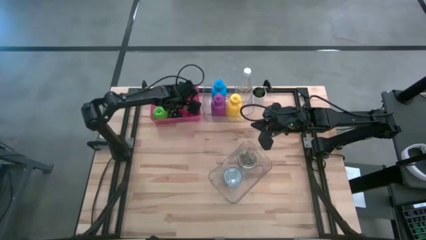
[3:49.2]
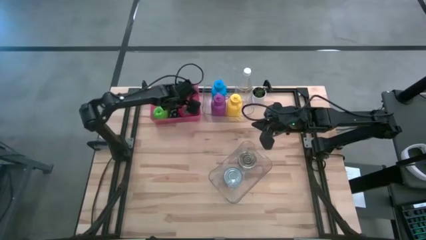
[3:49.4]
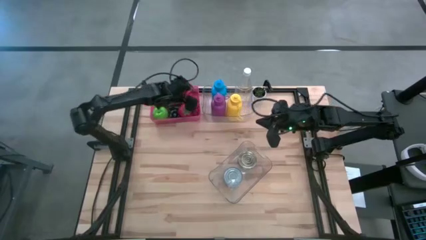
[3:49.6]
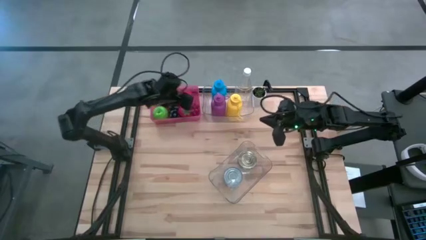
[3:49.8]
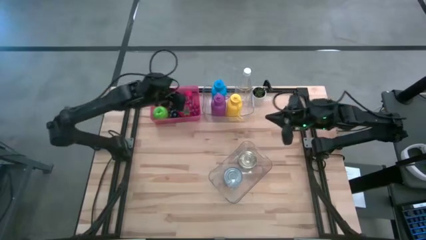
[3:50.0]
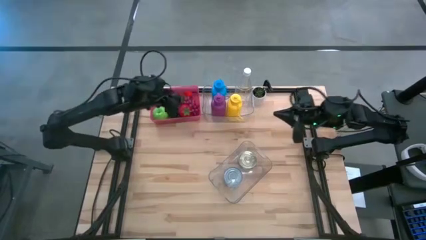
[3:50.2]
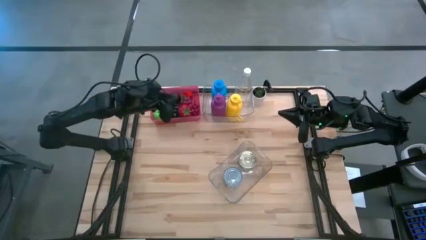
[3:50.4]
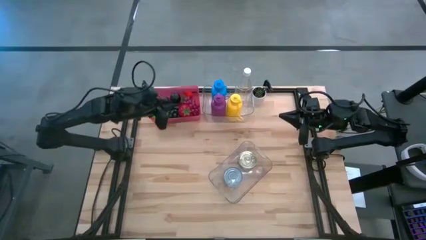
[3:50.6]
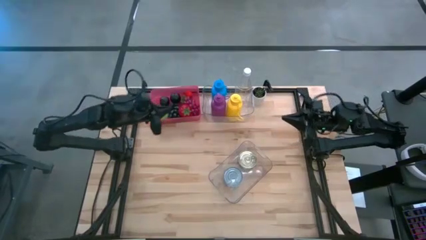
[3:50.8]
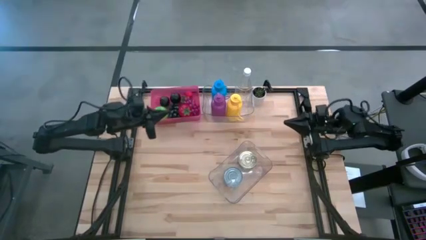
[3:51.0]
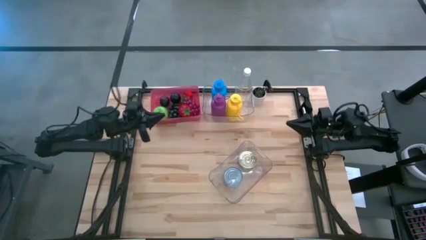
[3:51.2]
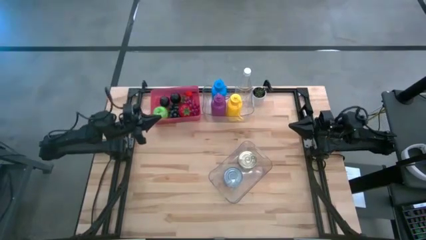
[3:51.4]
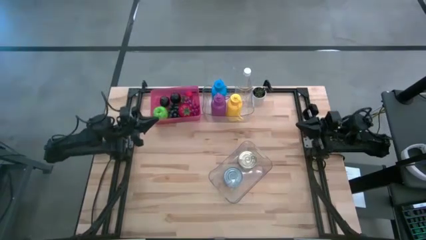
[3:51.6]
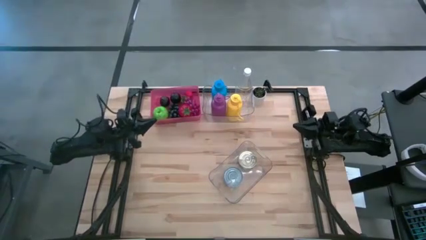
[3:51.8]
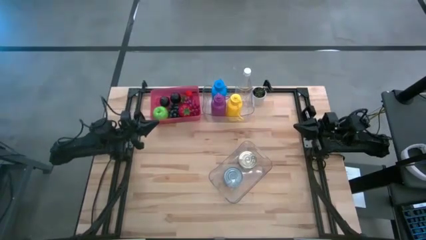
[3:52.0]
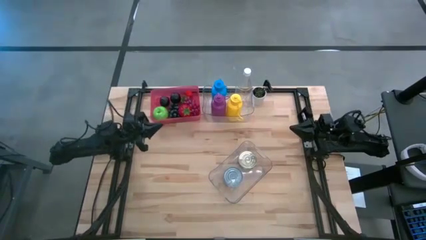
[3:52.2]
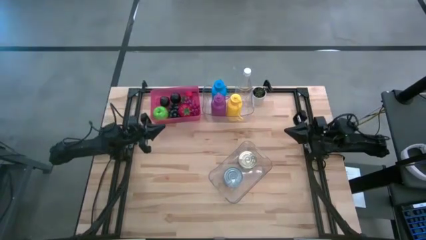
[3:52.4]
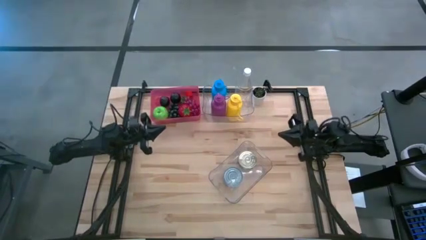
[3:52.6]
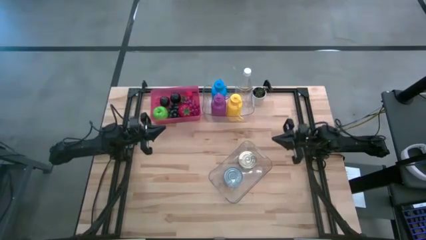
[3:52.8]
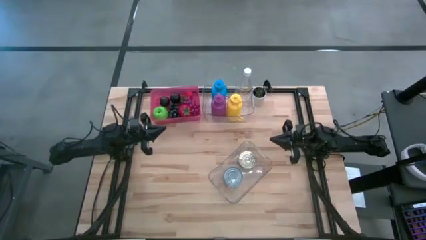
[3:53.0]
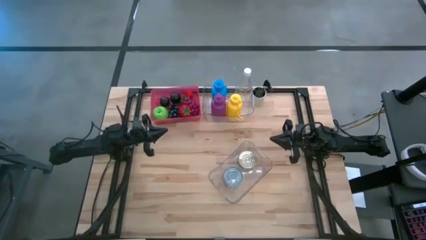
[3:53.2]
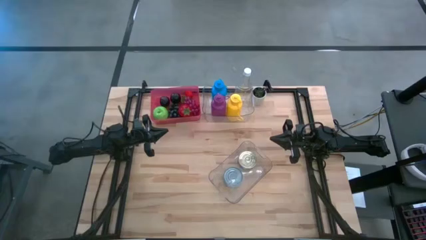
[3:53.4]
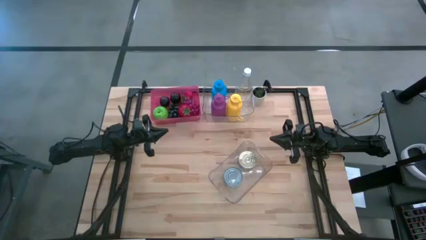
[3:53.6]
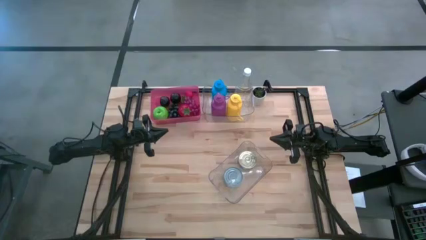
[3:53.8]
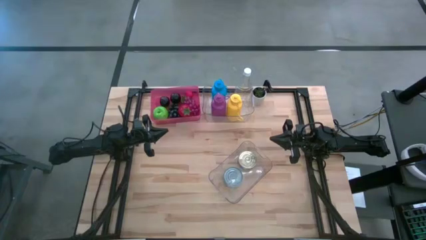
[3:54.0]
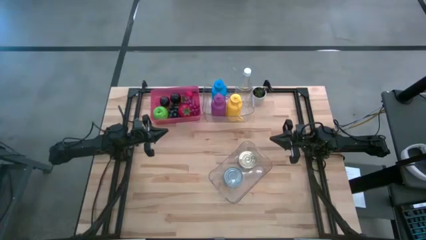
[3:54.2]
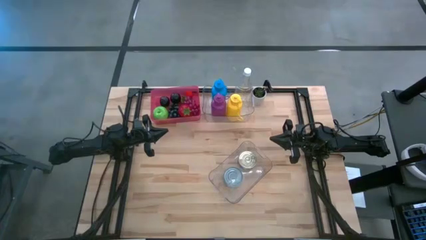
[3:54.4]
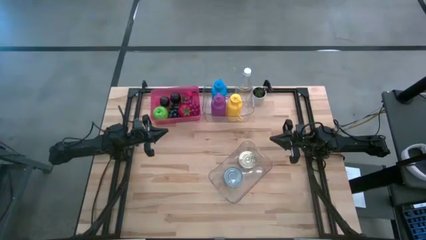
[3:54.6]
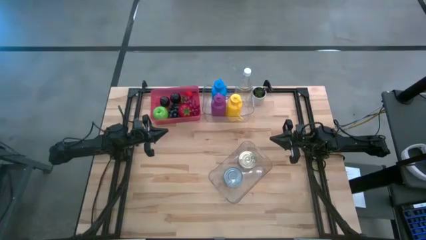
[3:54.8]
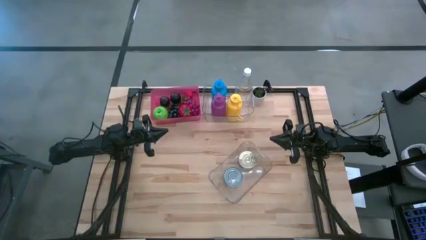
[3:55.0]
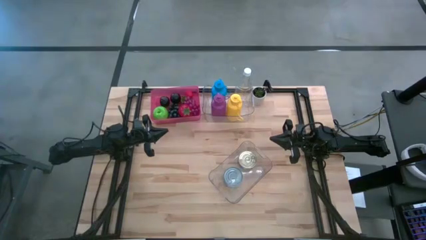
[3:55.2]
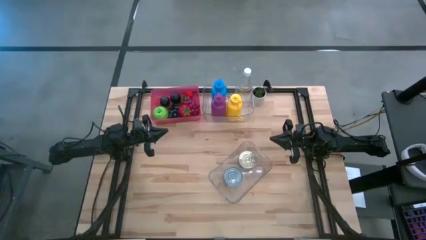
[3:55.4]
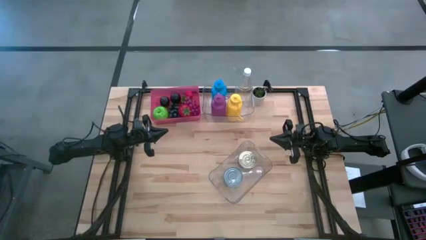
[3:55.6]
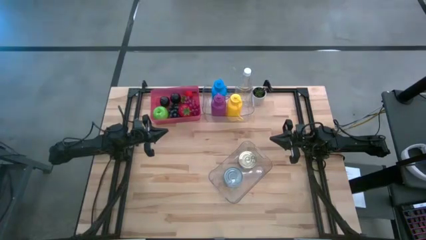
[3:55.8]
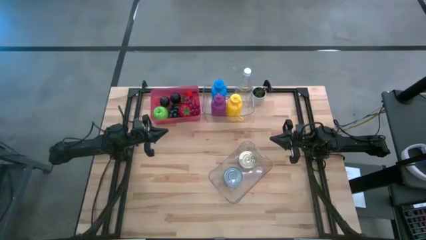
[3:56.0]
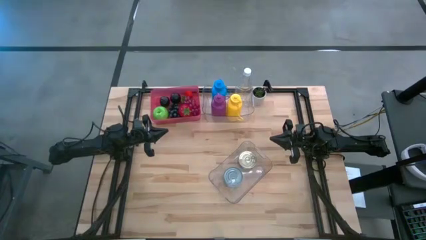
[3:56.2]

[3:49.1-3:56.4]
Task: Pick & Place Food Item
Return to Home Position

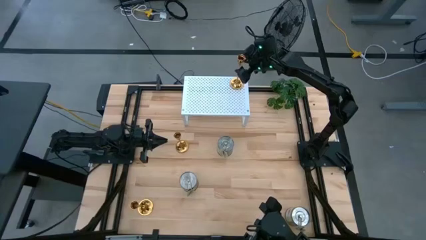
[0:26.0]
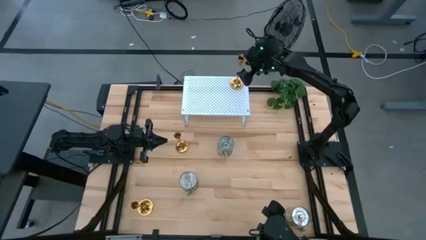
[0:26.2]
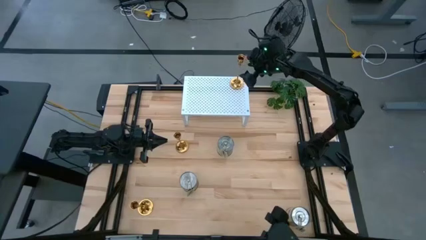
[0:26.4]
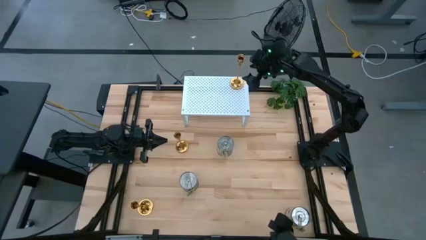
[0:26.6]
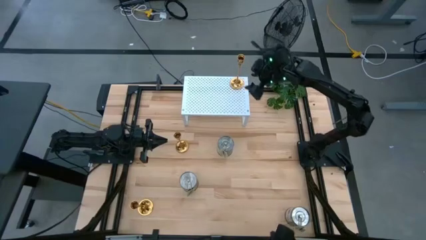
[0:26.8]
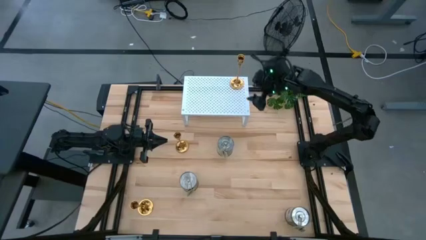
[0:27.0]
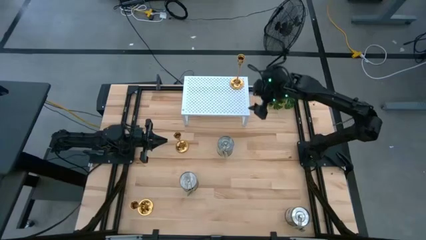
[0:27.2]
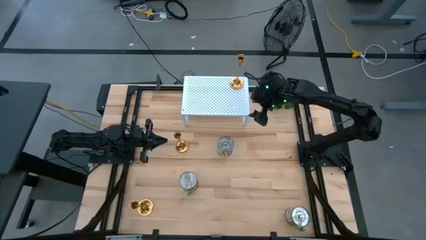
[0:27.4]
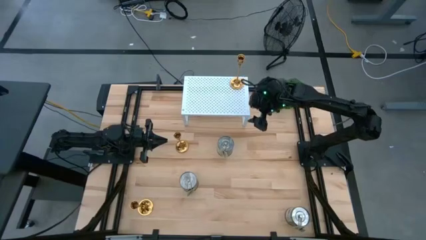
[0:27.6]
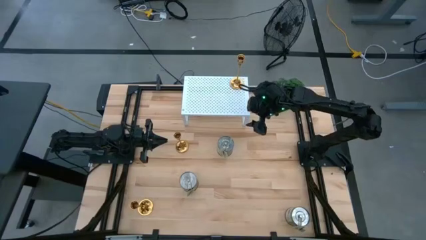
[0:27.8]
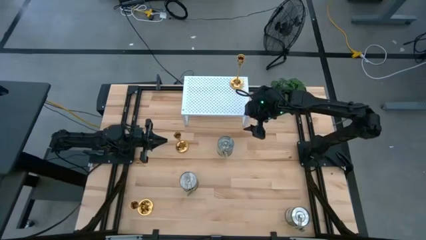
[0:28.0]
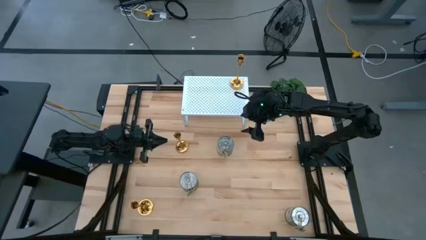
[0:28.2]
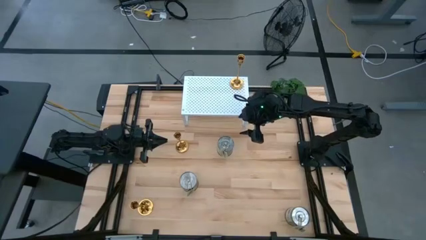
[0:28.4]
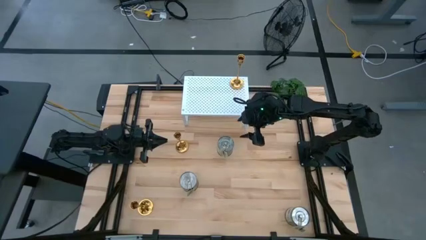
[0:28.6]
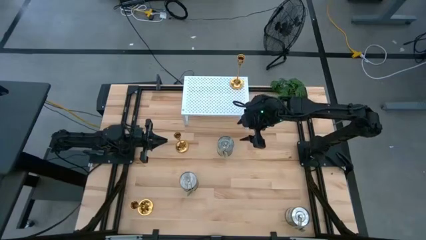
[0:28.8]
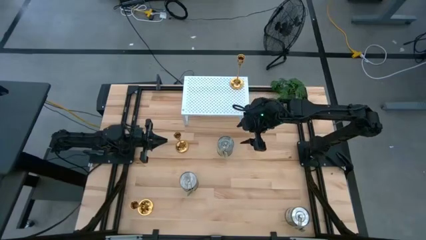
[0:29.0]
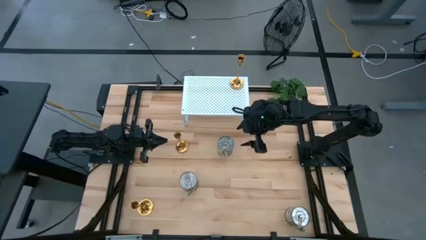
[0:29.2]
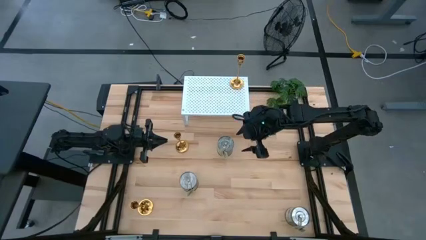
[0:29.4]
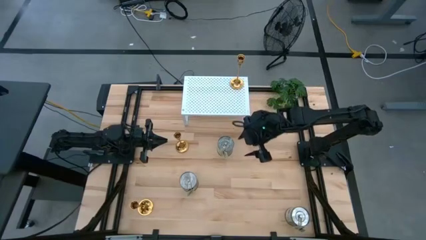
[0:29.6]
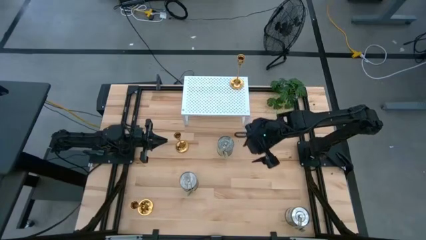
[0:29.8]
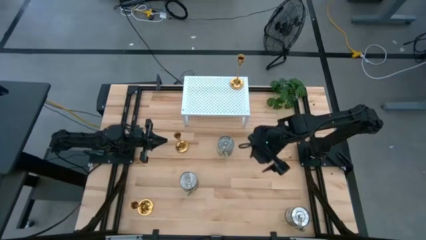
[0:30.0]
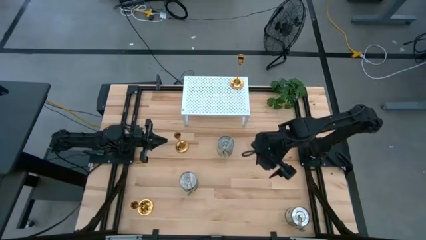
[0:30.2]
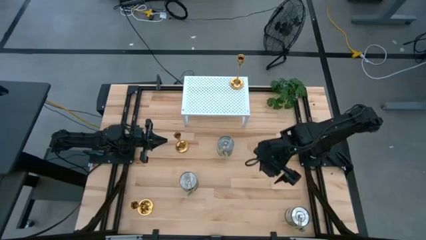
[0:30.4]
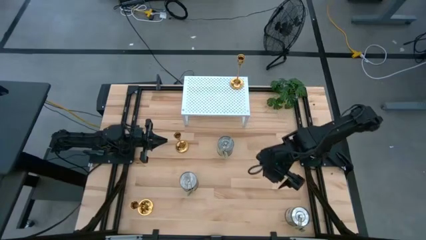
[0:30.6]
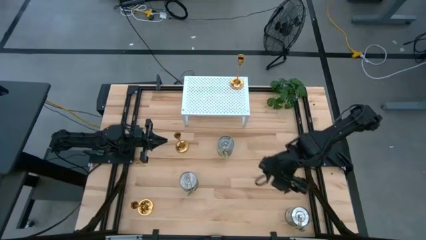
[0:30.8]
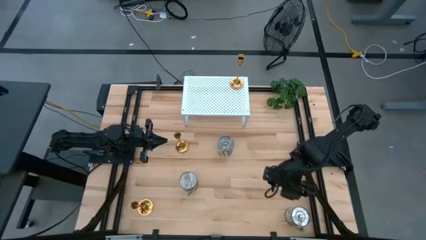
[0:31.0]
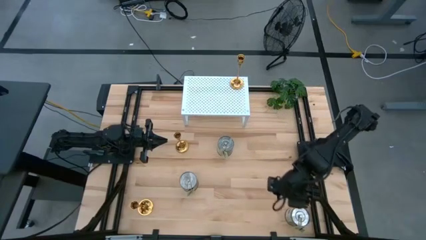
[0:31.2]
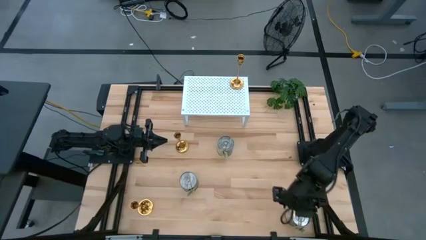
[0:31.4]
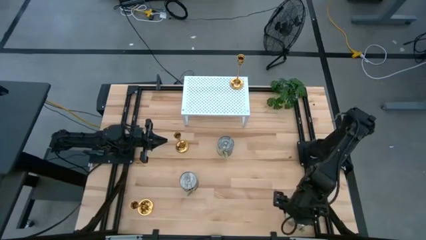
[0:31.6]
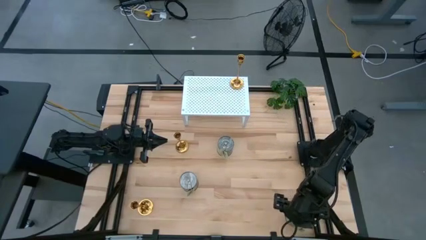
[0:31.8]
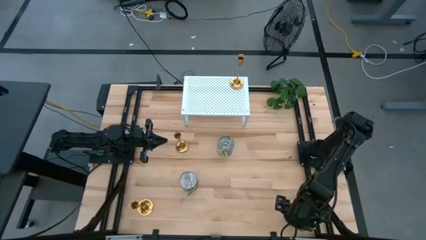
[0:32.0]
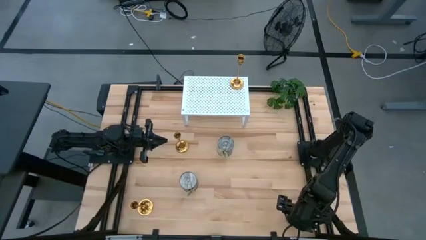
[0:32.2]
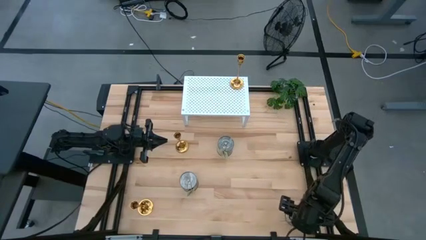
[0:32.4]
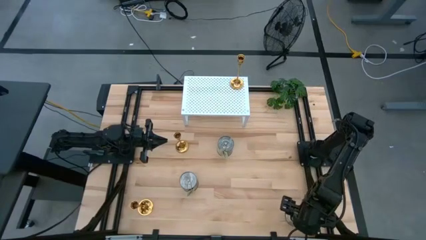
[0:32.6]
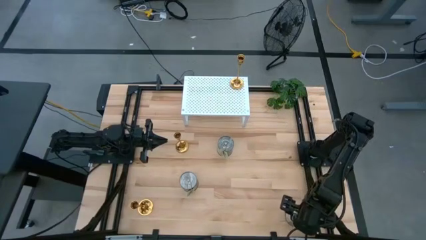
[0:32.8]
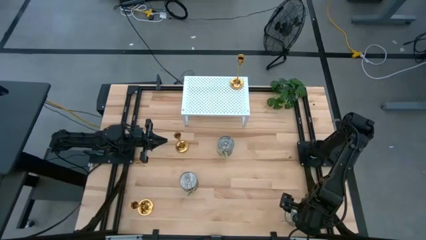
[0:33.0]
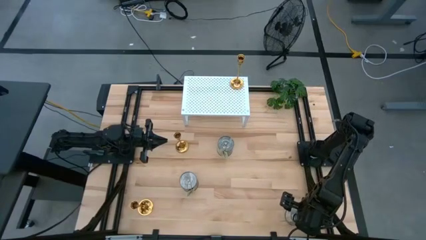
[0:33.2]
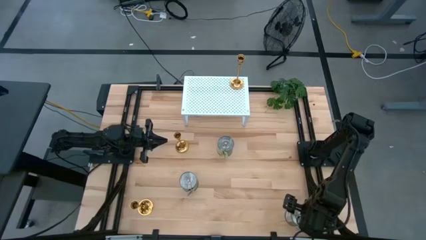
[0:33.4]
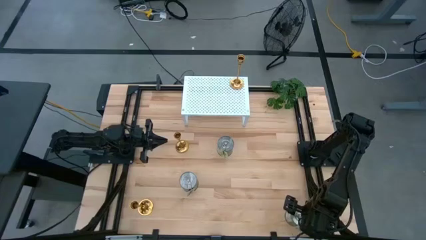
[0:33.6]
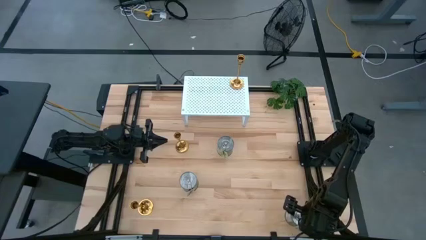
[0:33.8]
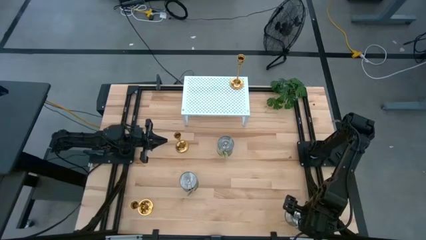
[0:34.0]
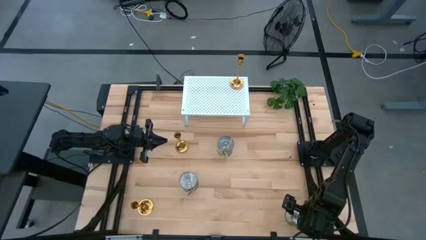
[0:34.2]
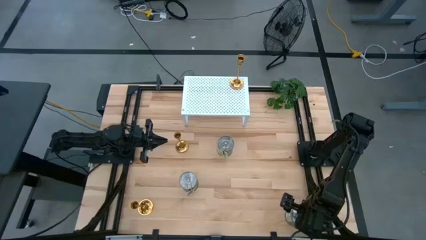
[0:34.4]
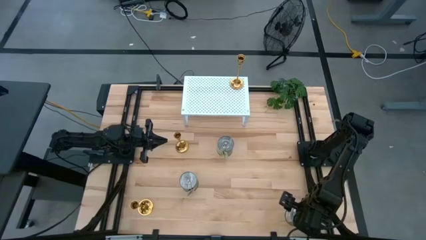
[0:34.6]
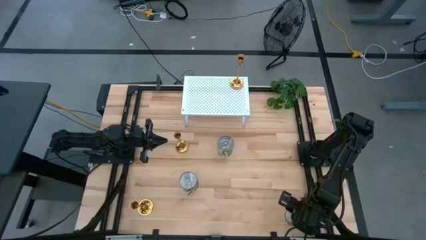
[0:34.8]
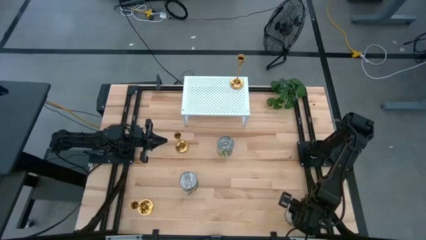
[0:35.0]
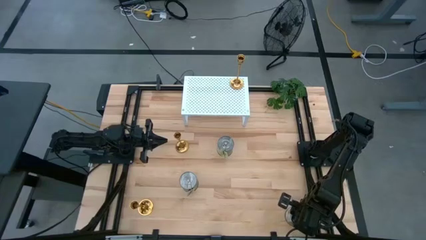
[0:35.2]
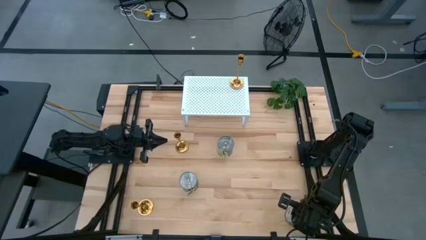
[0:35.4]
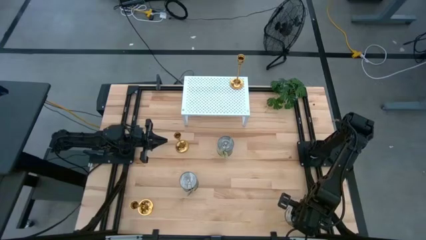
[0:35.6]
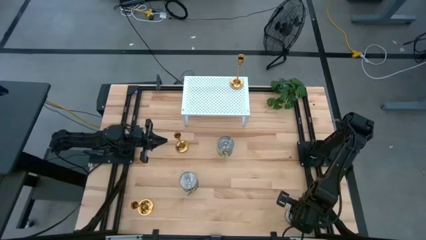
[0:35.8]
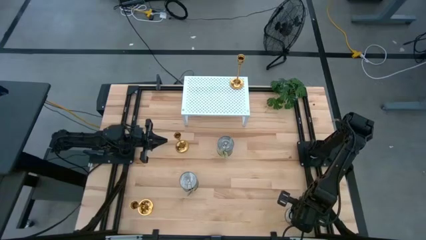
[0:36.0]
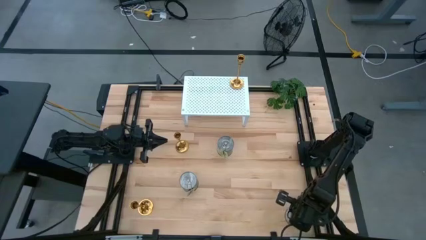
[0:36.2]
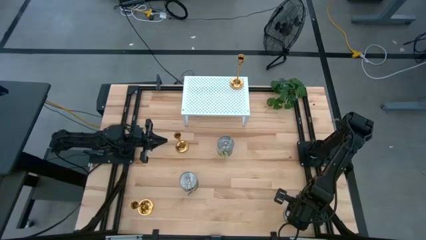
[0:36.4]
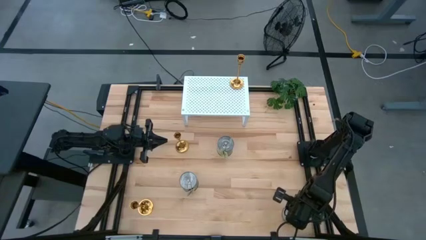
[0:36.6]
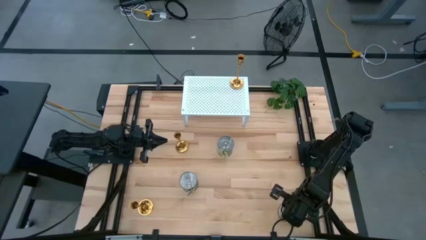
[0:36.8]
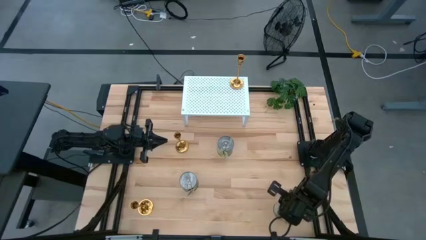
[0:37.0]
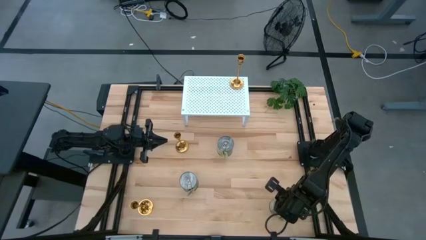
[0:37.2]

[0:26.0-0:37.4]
Task: Pick & Place candle stick holders
Put the right scented candle can on the shelf
